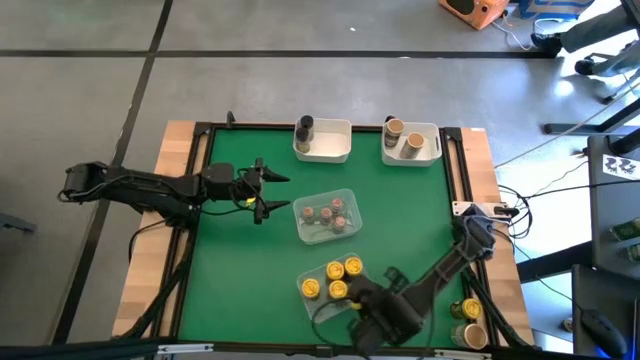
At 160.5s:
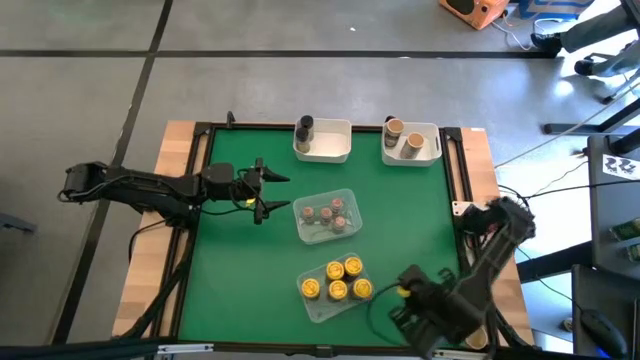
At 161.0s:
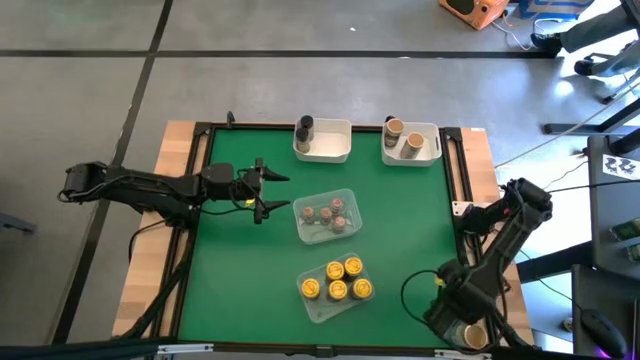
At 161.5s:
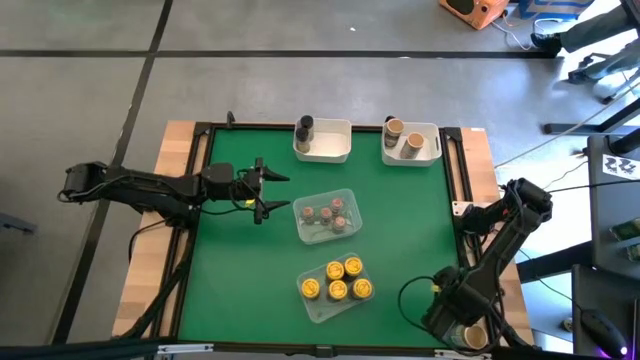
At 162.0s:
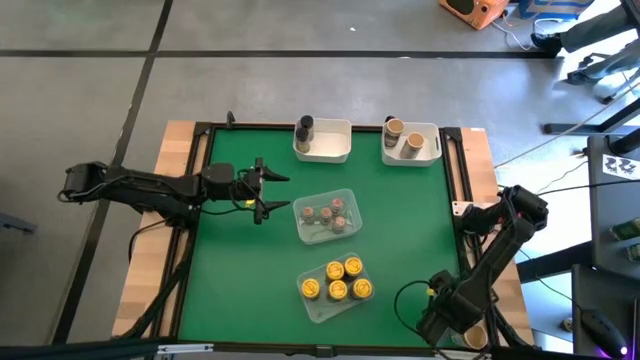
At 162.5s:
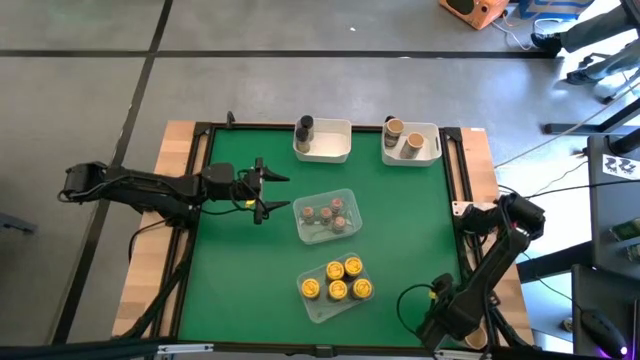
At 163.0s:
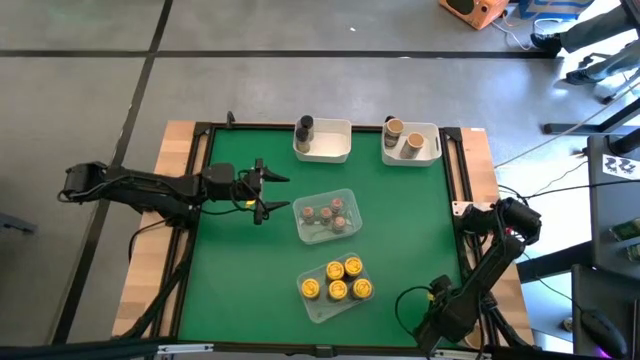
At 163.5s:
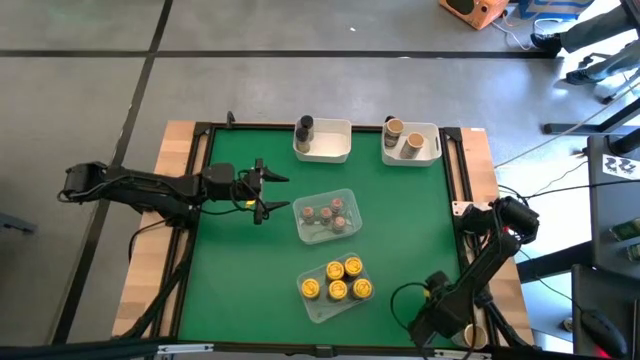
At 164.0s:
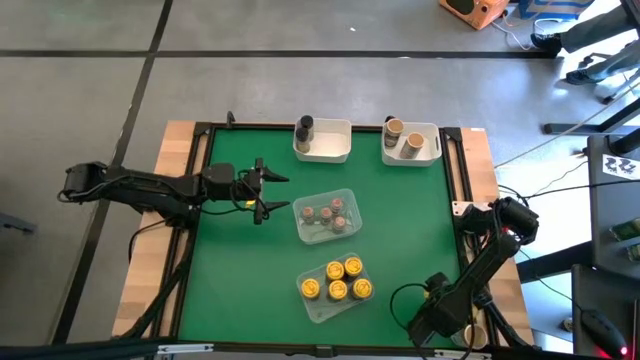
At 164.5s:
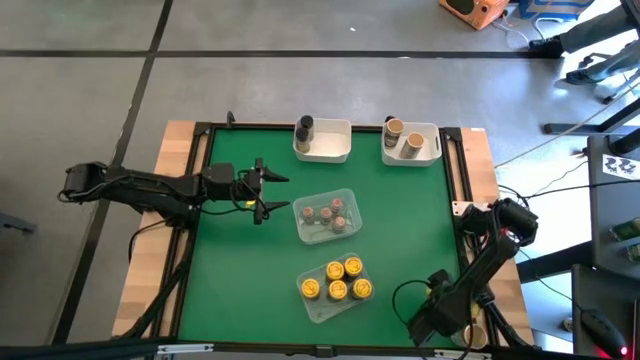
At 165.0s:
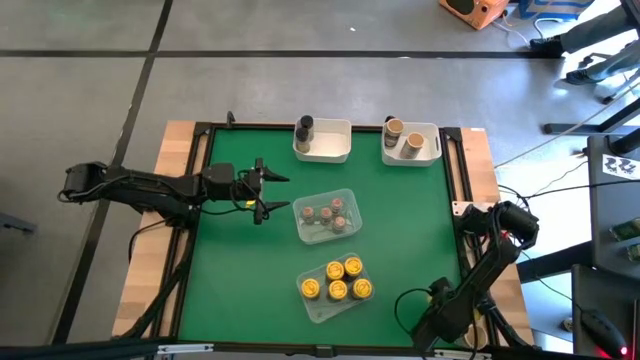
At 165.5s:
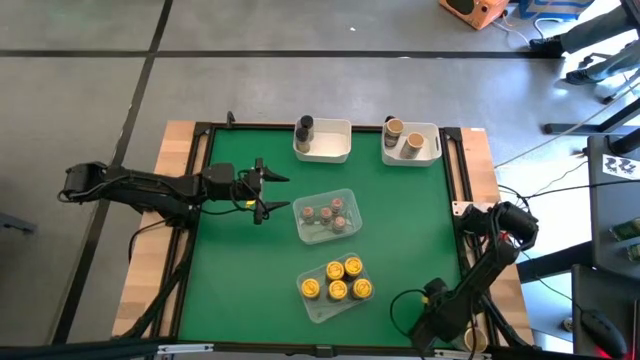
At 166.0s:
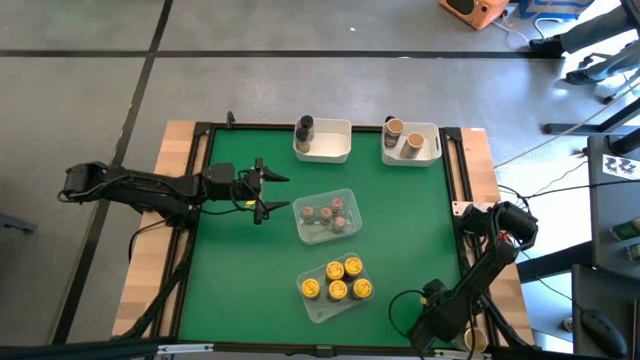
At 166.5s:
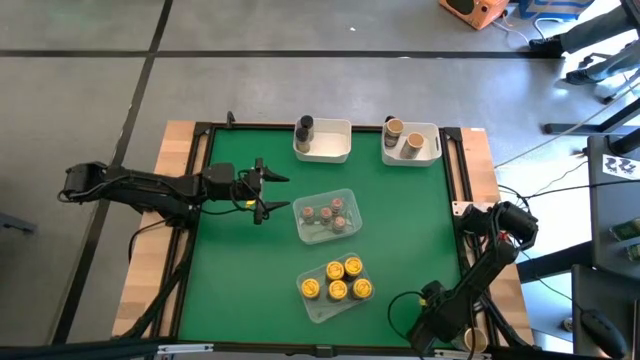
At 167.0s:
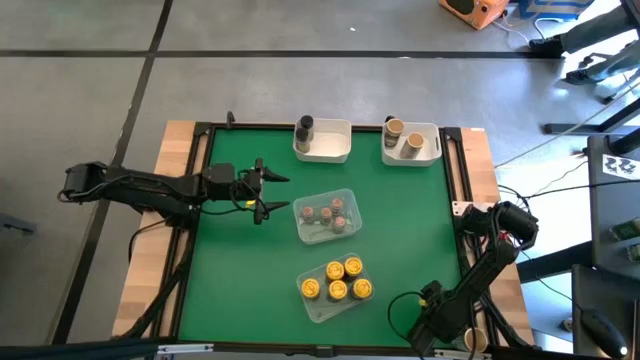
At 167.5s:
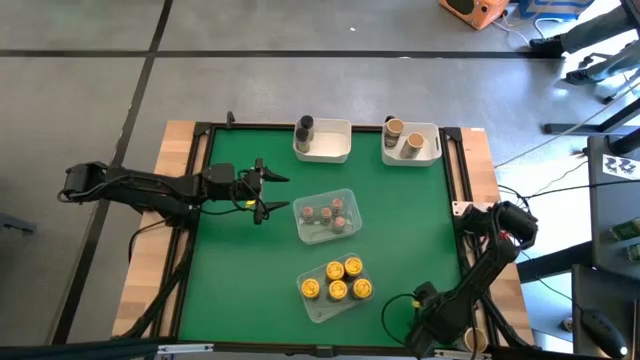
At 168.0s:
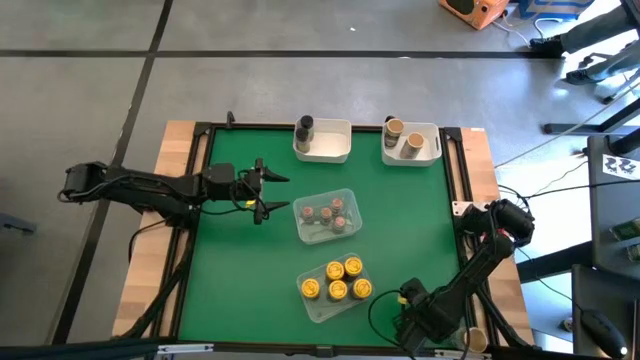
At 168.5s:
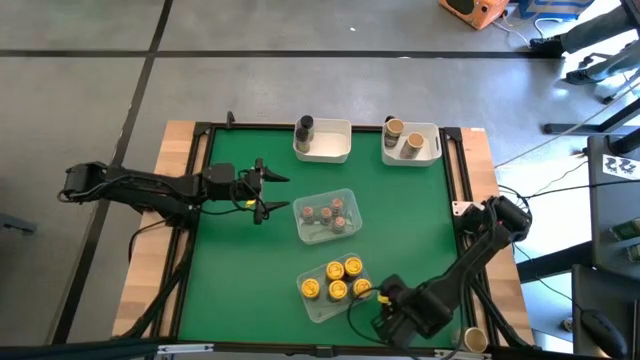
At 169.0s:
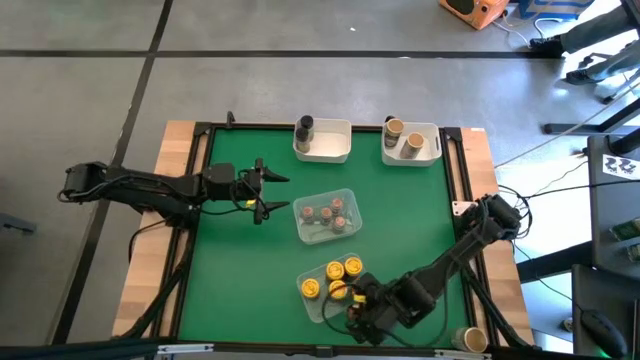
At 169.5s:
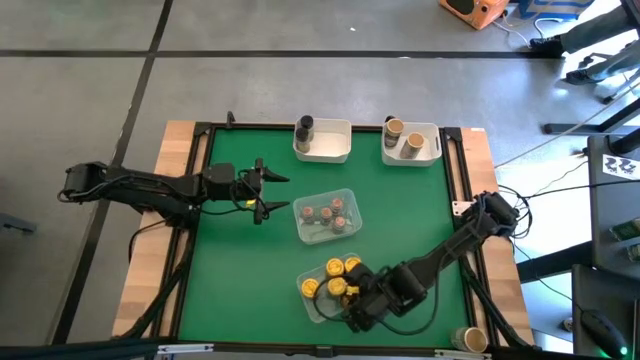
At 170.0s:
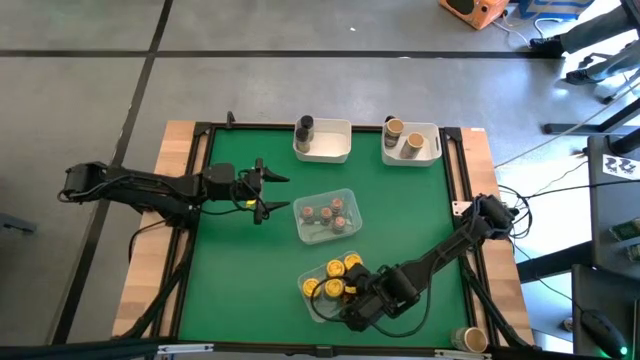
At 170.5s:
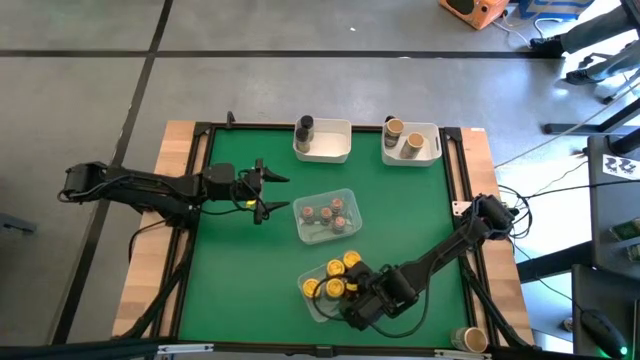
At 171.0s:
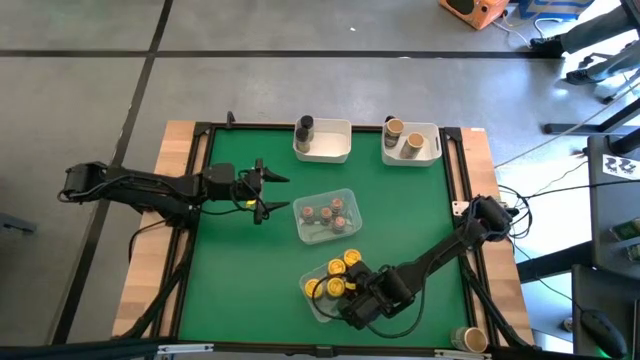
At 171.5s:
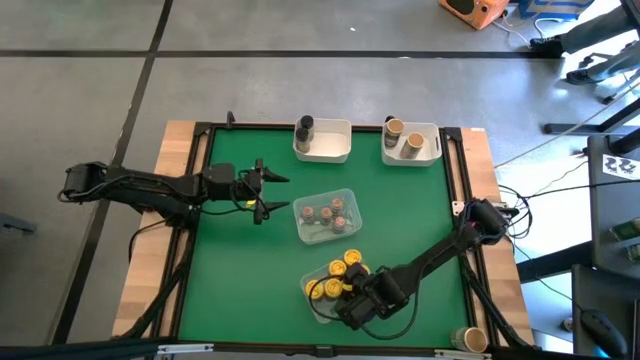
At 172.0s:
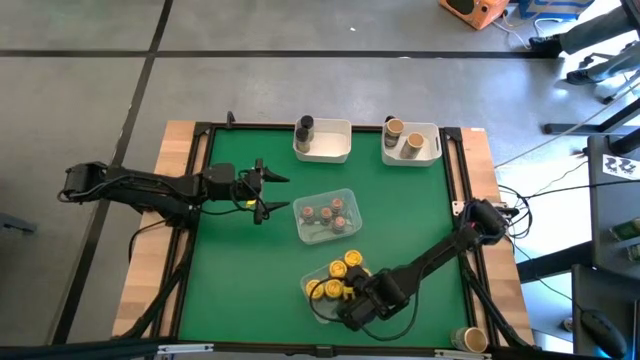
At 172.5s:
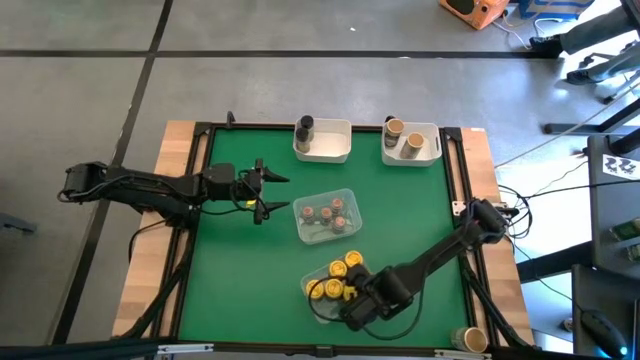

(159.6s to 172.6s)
Task: Sort spices by type
Put the yellow seasoning bottle into the bottom transparent bin

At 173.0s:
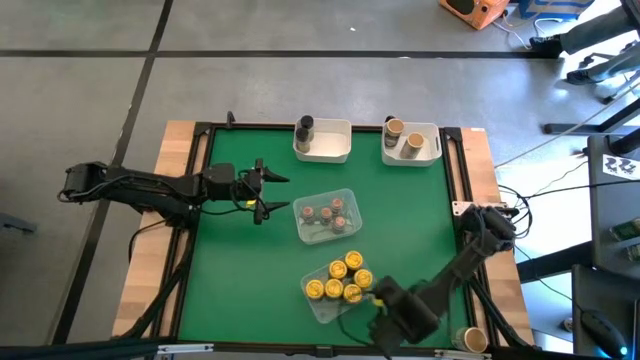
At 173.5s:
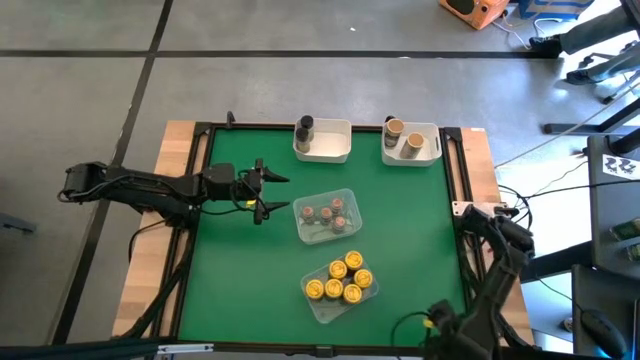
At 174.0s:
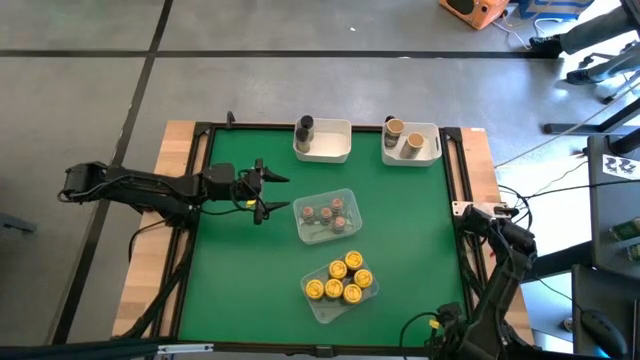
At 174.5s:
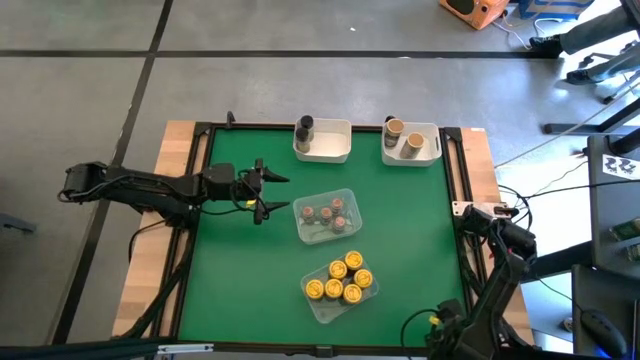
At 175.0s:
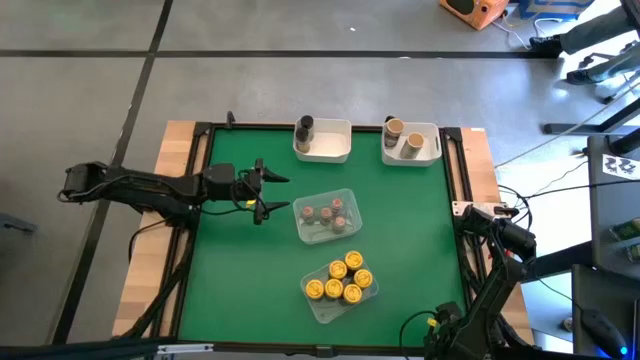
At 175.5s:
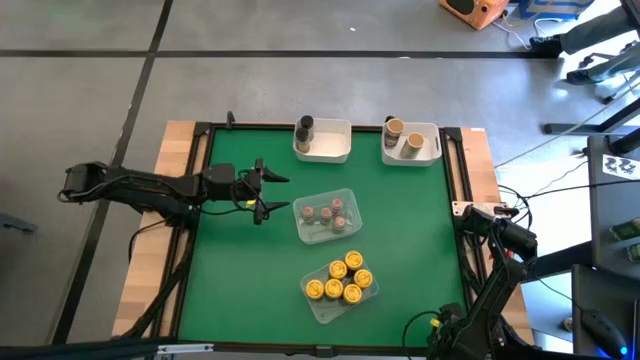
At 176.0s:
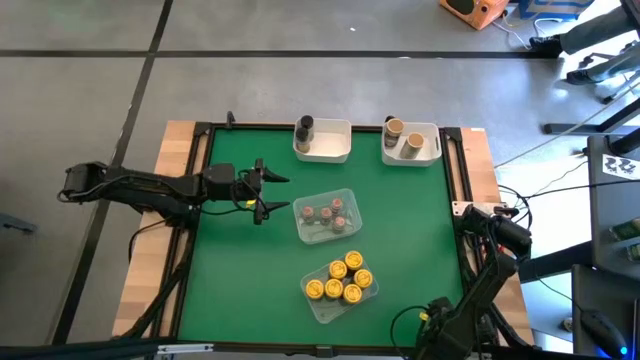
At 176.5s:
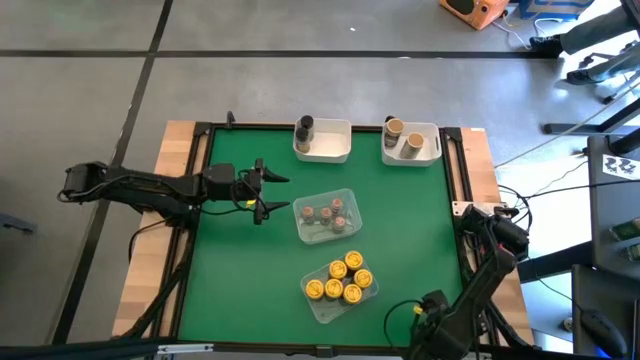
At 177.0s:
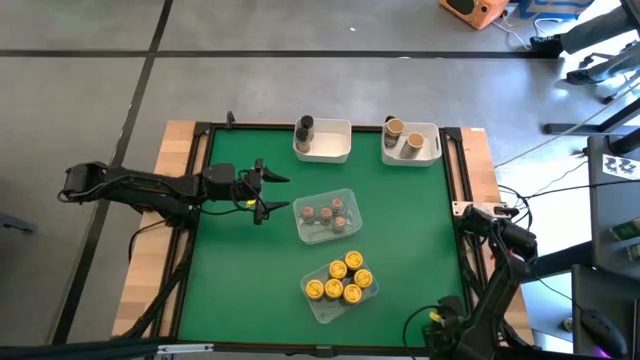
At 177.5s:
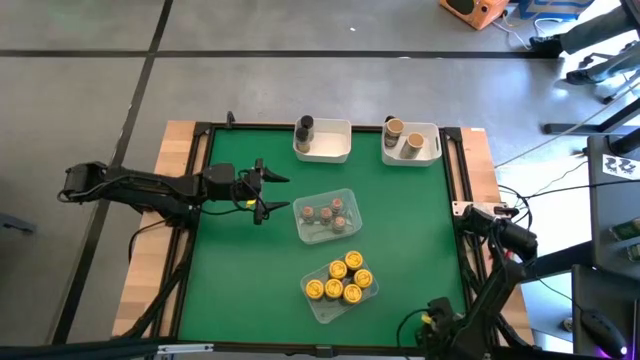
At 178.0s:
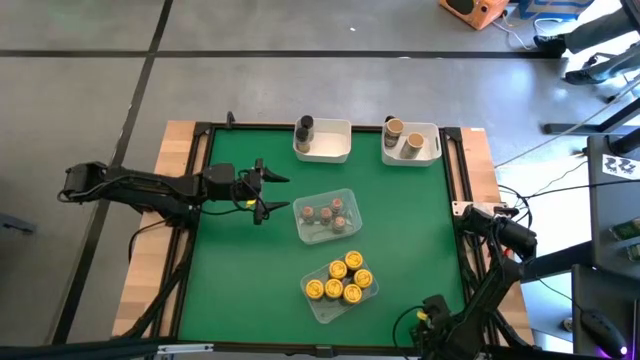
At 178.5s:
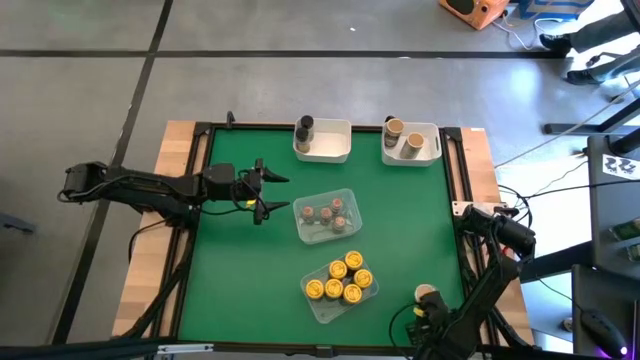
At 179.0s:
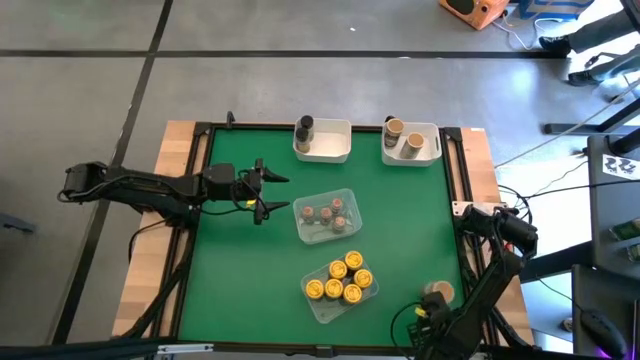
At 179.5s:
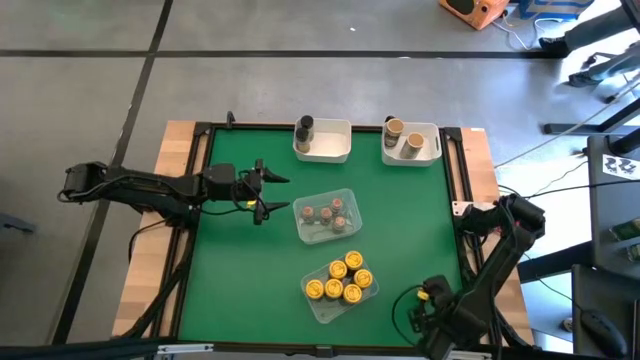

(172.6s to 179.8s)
Put the brown seasoning bottle into the top right white bin

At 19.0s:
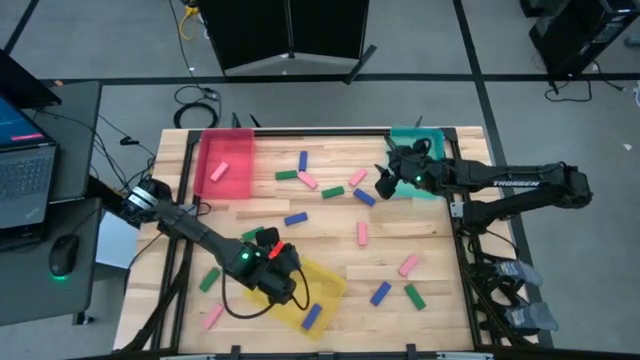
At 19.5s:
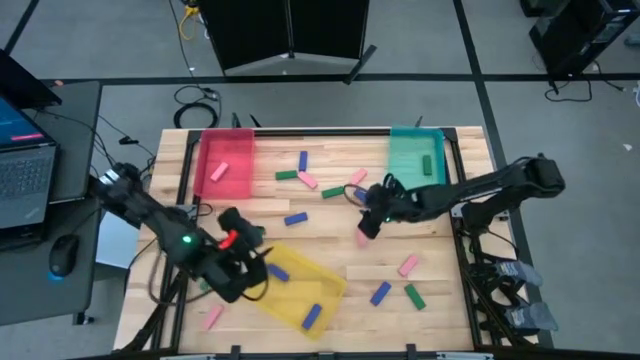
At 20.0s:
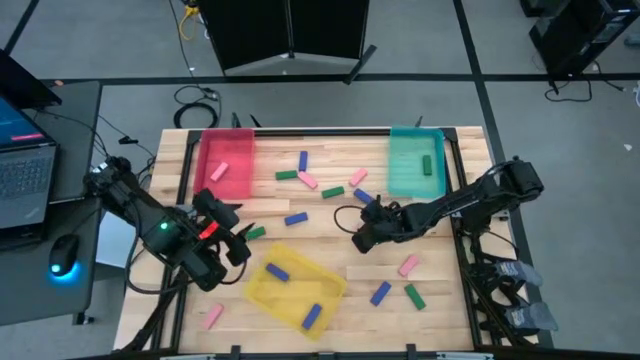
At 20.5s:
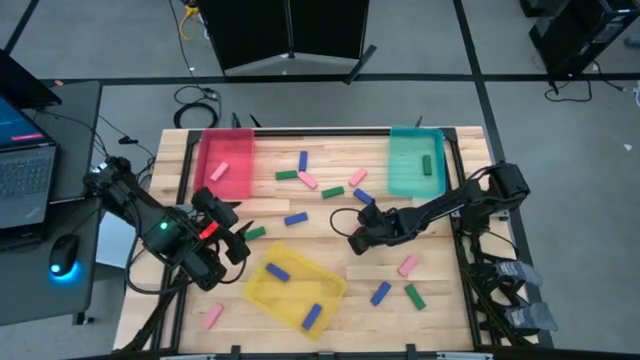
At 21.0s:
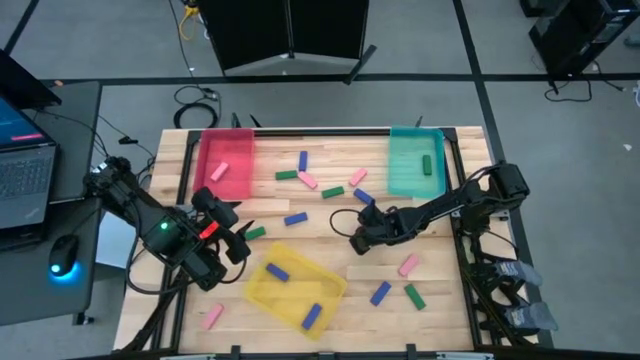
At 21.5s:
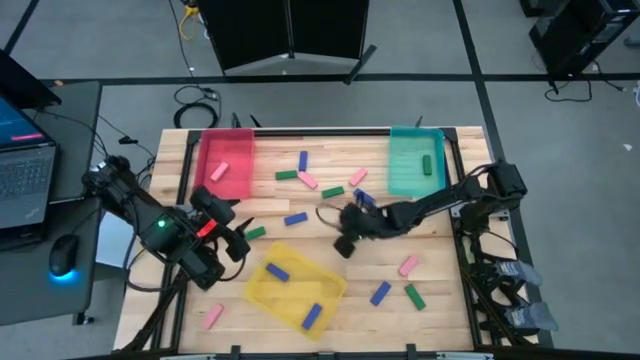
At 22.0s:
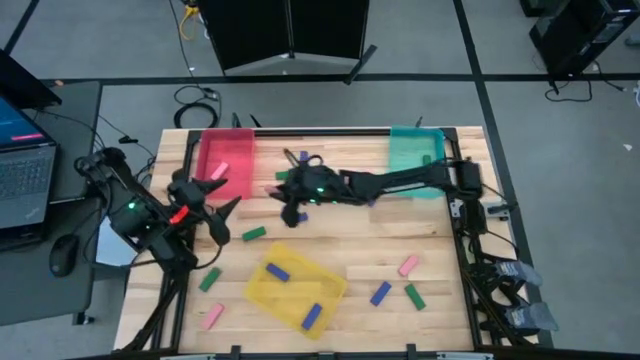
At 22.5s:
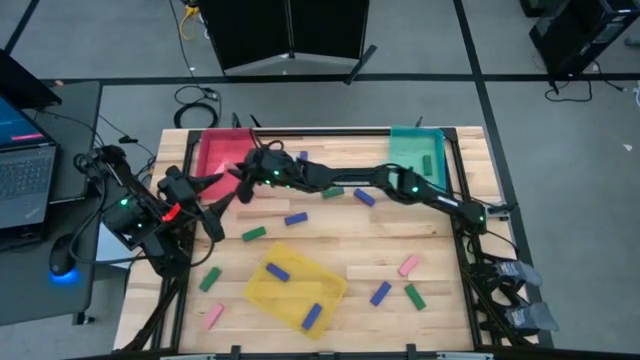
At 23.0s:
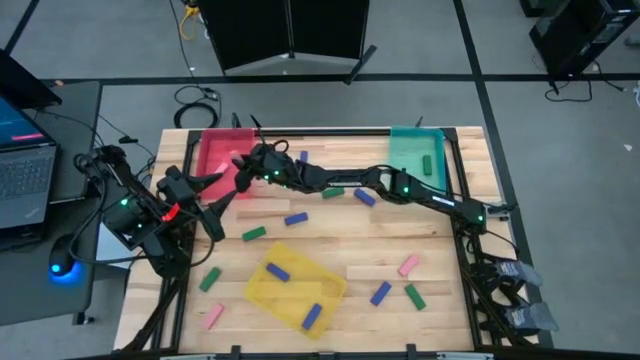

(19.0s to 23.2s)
Task: Sort blocks
Put the pink block into the red bin
